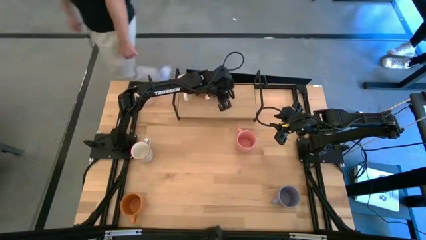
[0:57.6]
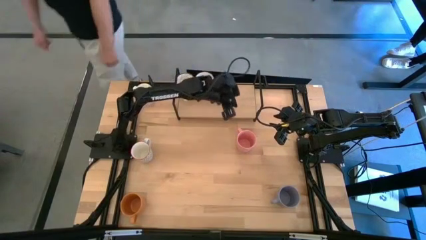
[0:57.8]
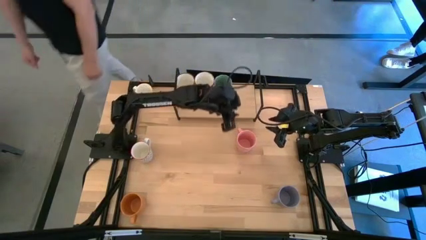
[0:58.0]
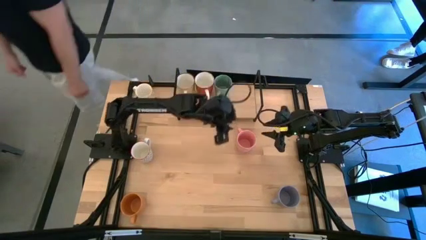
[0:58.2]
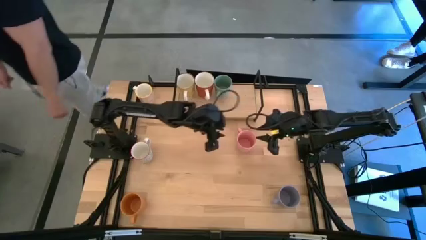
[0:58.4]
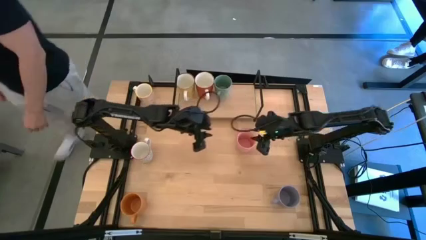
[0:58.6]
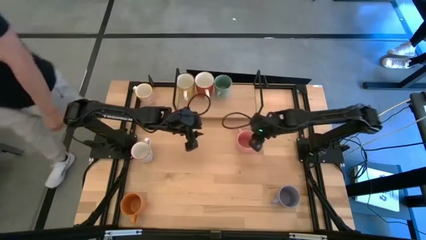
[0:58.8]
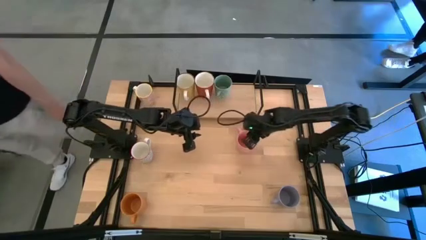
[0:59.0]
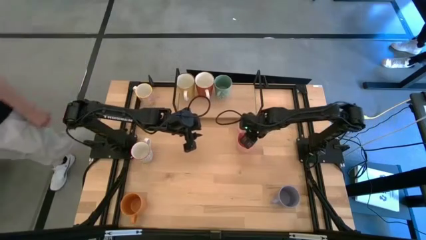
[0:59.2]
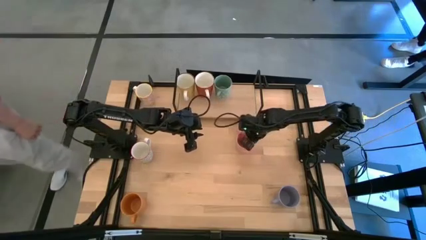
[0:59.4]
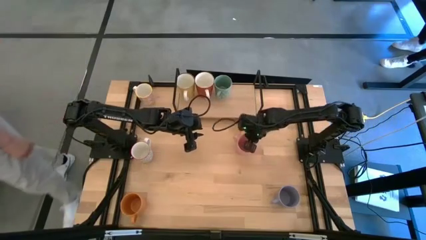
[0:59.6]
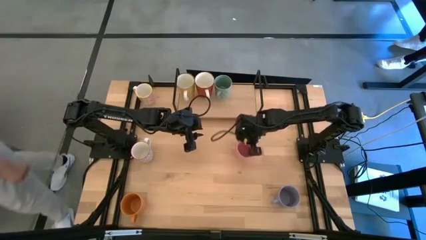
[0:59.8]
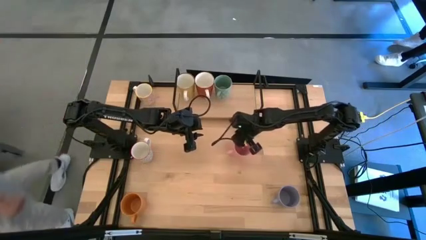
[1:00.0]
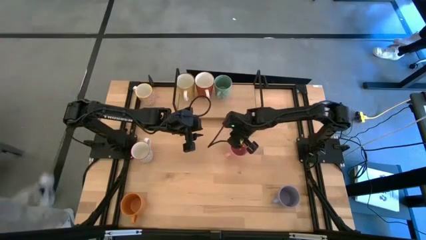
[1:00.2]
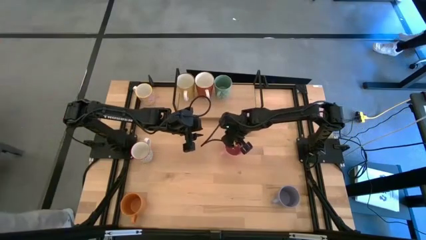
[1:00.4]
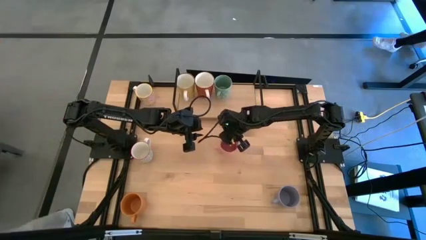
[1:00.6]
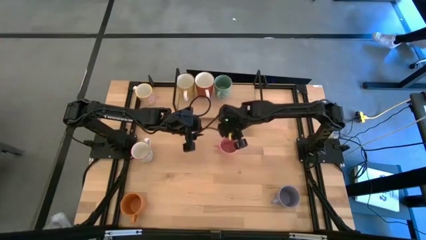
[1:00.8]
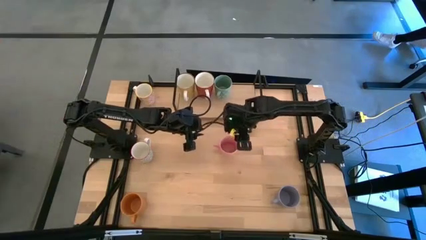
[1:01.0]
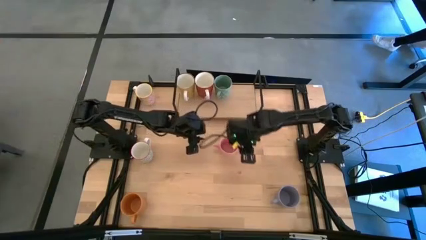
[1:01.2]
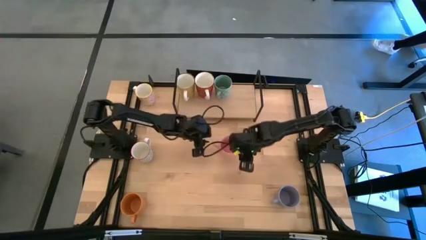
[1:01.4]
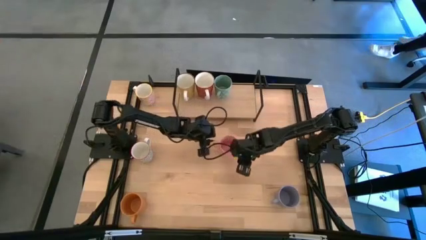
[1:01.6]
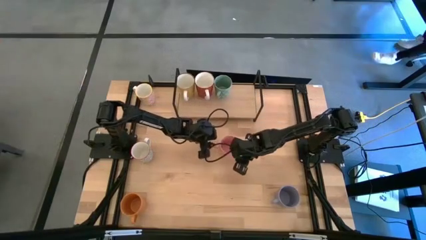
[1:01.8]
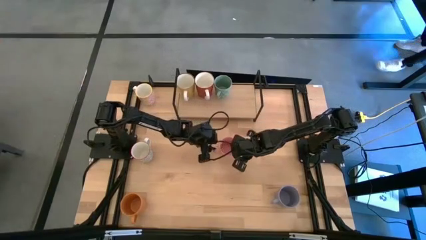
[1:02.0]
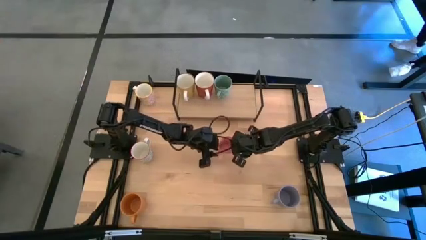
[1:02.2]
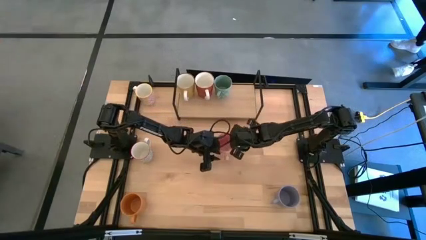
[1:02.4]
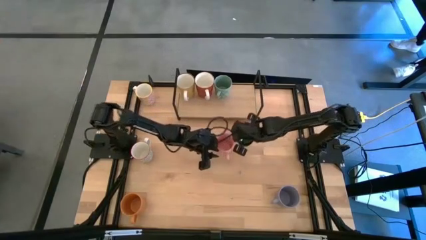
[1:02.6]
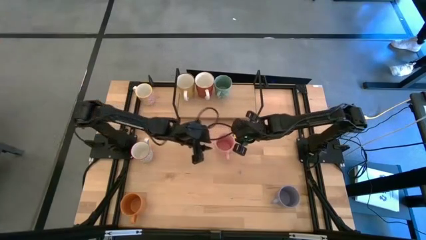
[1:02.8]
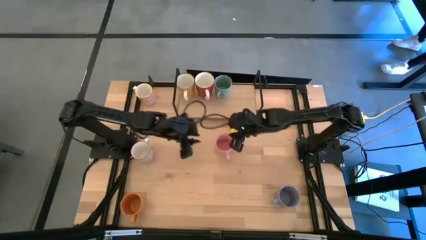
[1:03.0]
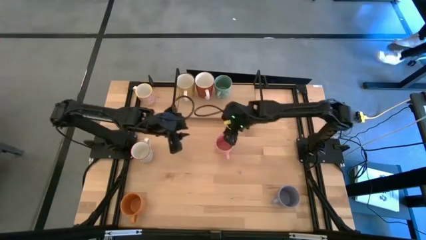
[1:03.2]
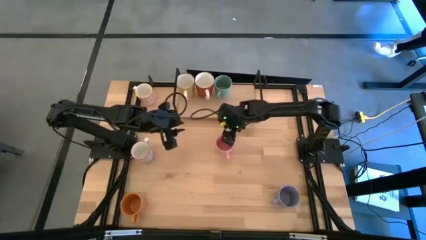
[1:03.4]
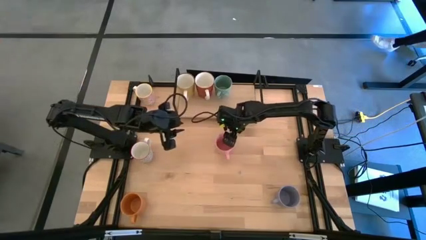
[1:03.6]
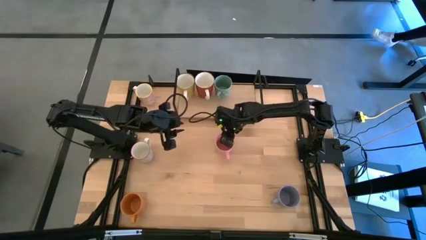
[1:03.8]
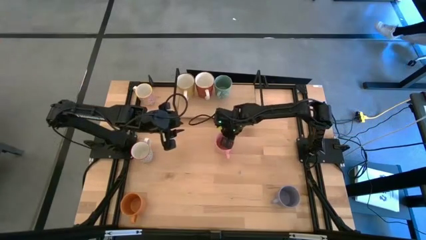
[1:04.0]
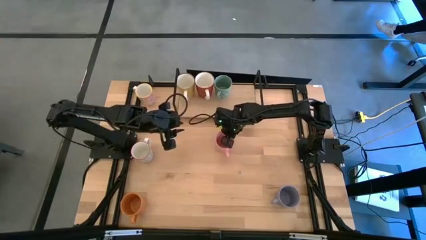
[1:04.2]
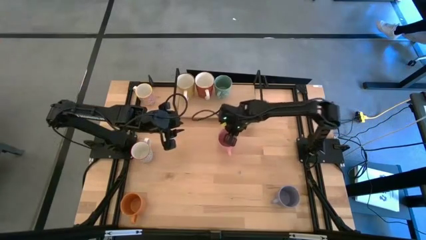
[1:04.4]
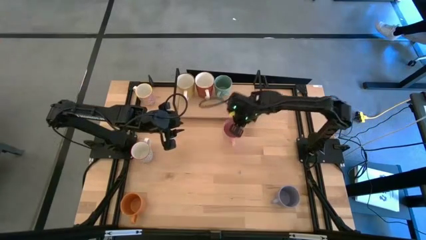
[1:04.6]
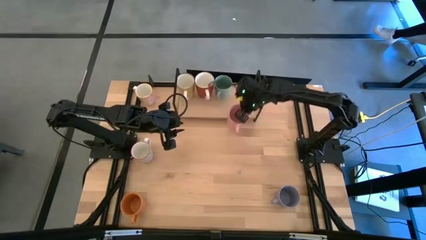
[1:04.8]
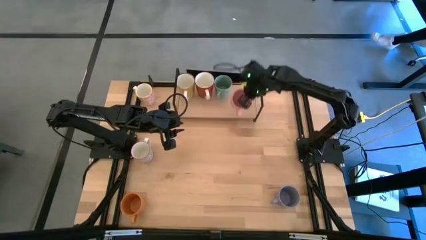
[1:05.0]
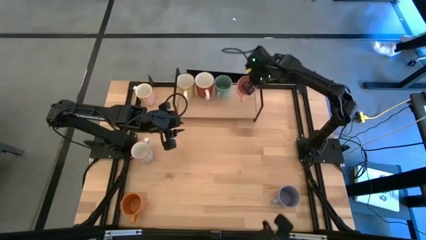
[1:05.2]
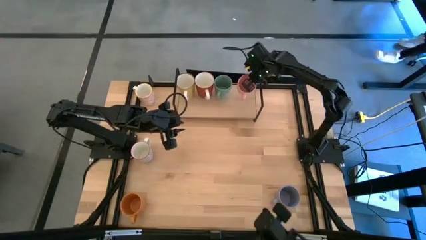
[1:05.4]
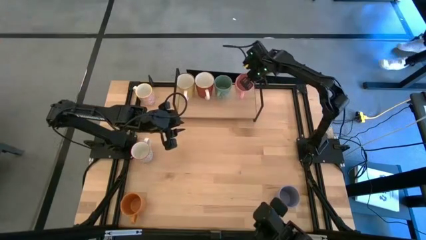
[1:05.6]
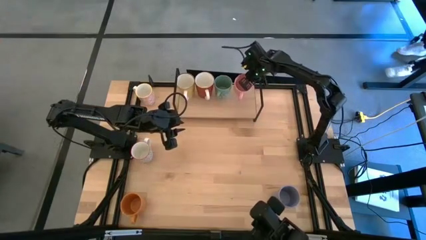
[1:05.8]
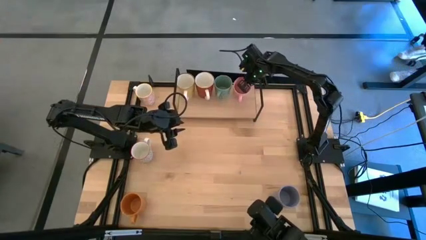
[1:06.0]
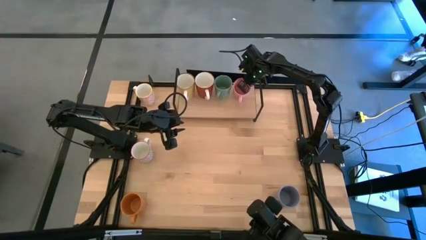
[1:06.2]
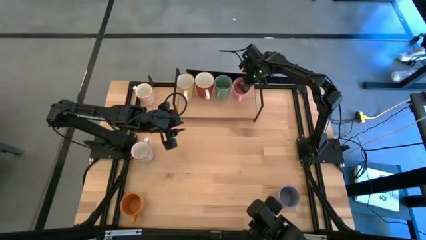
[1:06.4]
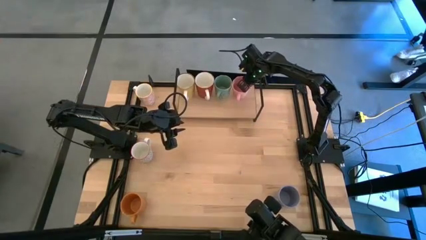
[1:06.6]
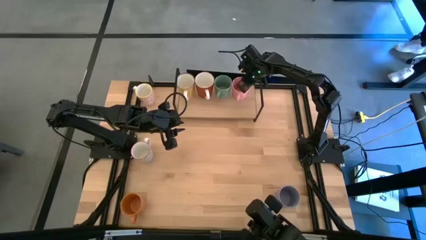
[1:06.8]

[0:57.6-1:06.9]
Task: Place coffee mugs
Put the pink mug on the shelf

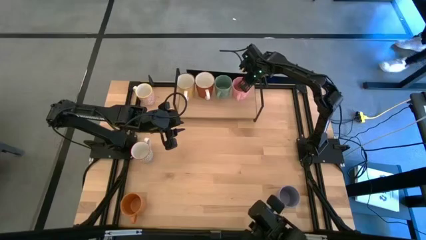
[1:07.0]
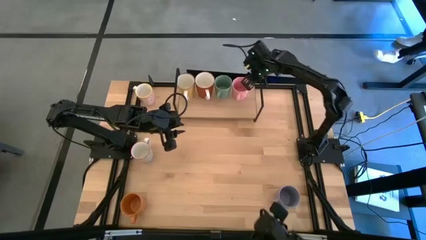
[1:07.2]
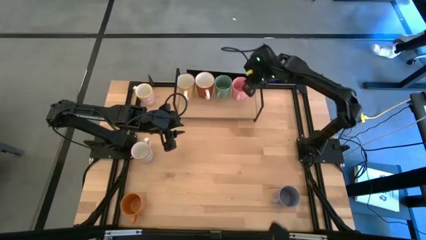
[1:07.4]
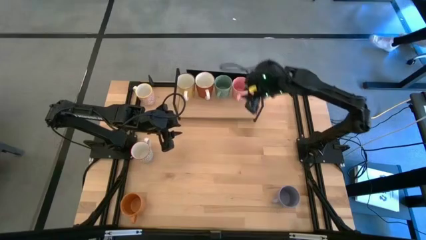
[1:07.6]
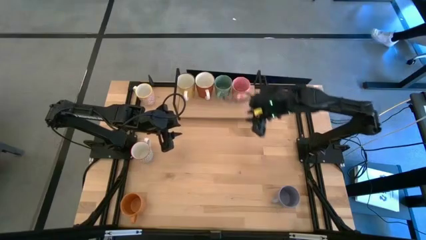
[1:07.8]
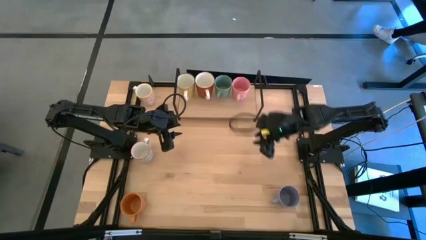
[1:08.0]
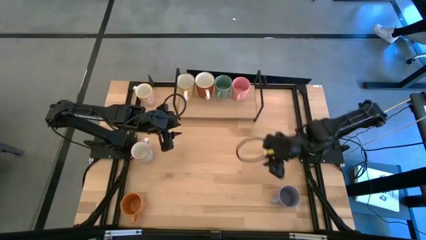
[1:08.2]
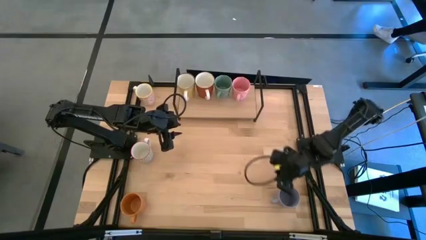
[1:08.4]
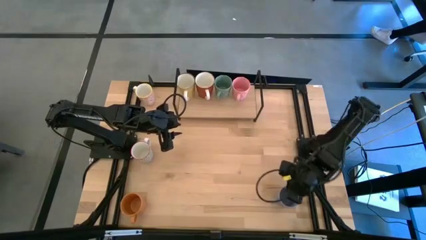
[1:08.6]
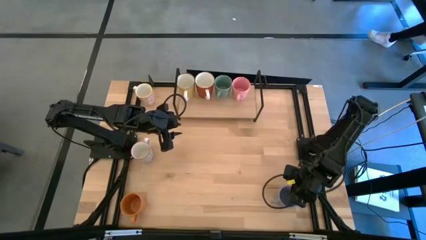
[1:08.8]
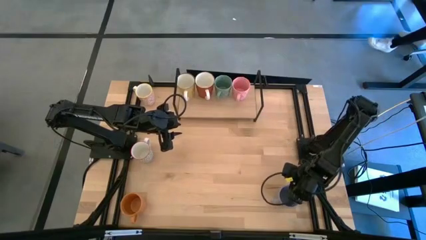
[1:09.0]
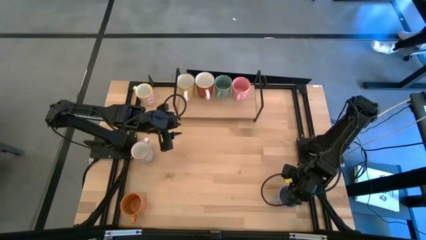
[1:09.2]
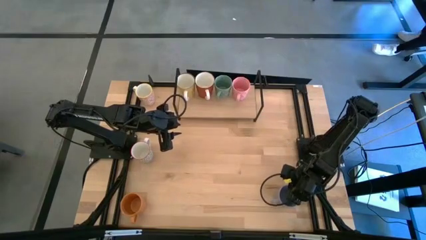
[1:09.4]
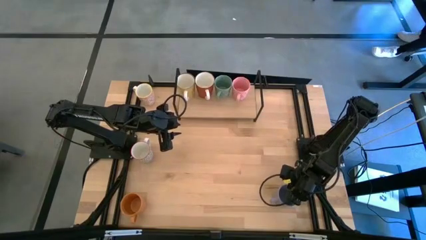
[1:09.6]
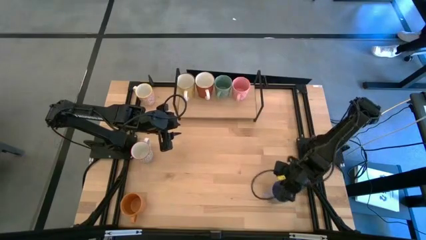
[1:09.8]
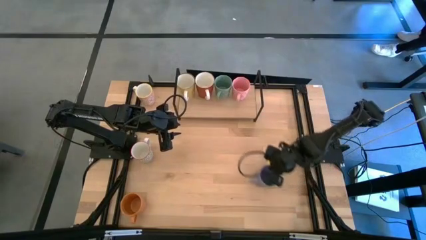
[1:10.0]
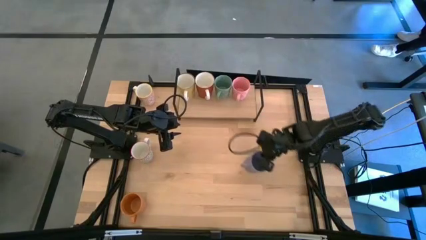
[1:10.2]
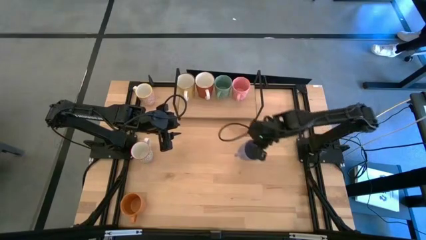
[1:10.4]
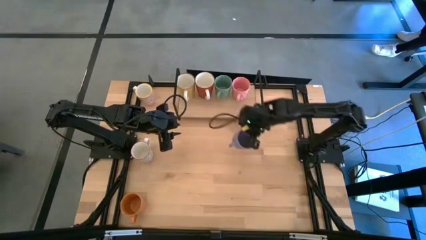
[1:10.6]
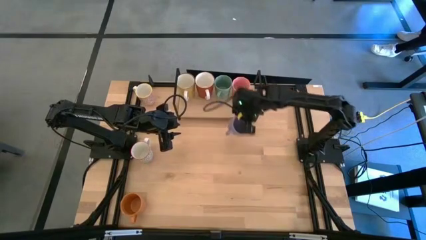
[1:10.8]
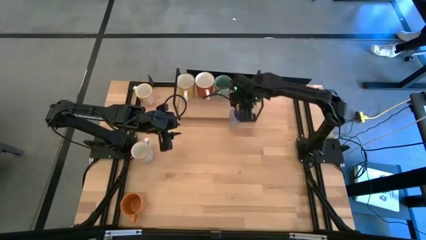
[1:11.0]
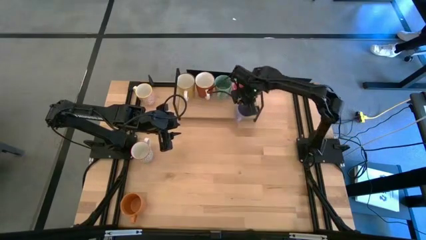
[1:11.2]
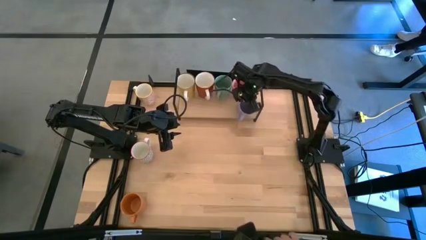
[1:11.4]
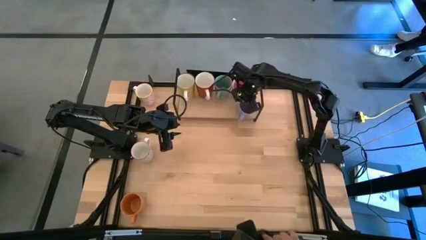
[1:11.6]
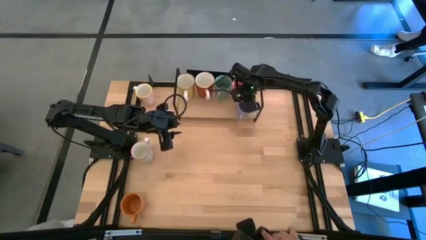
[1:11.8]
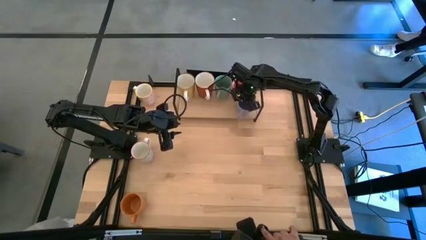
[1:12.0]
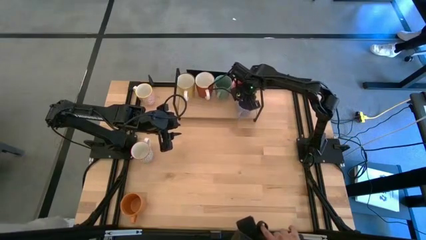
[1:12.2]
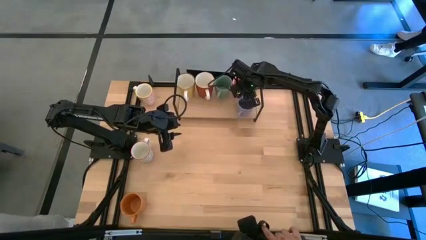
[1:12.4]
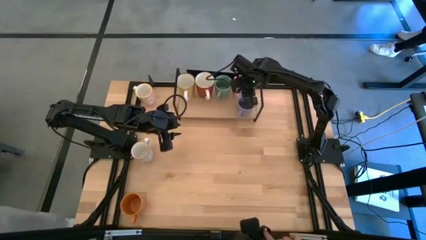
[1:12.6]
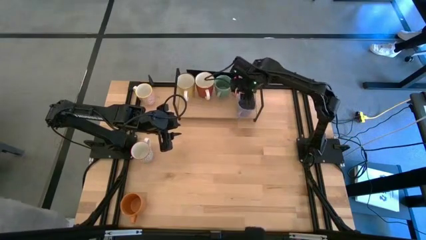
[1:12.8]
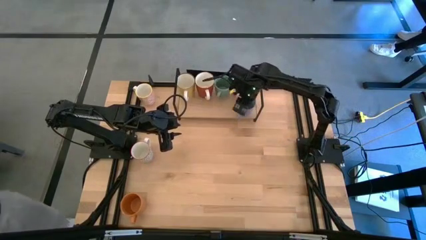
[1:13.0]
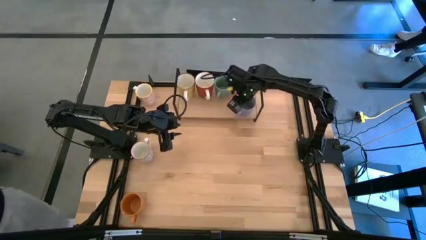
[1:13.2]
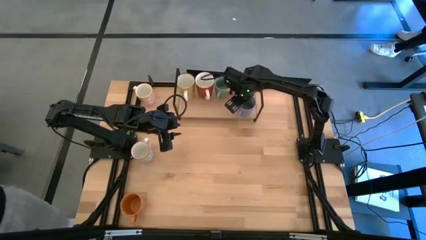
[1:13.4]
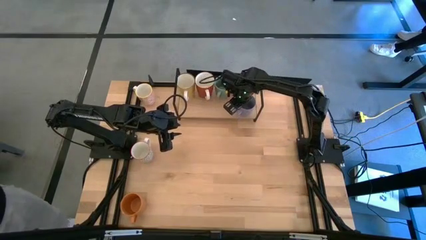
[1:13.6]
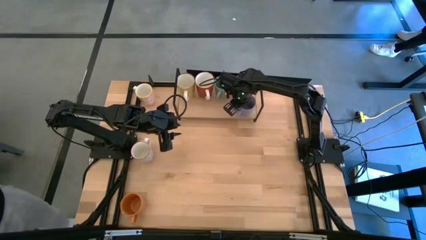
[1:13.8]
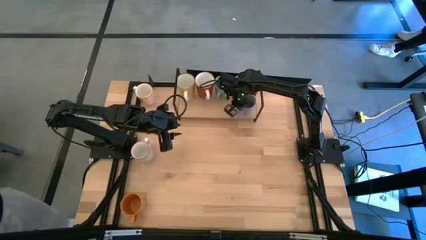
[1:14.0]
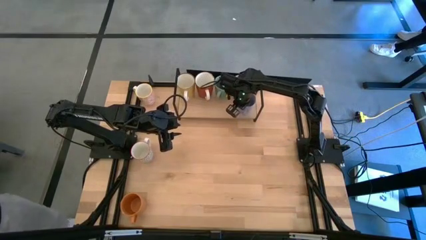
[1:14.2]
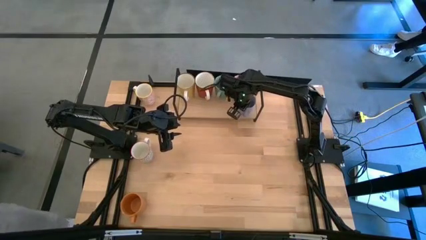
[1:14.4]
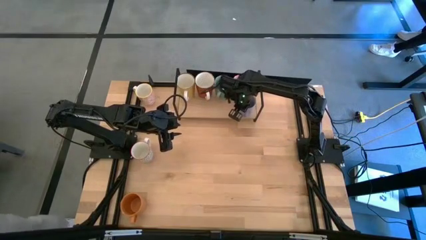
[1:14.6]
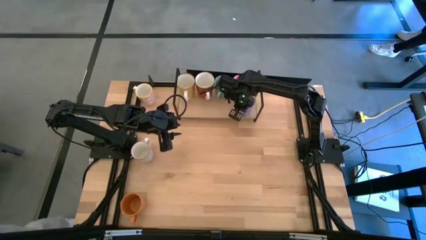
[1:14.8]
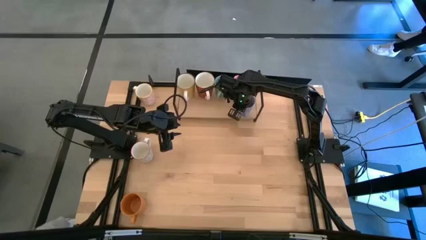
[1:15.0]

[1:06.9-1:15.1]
Put the purple mug on the shelf
